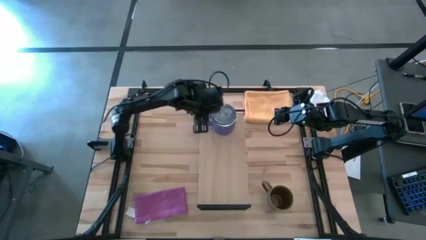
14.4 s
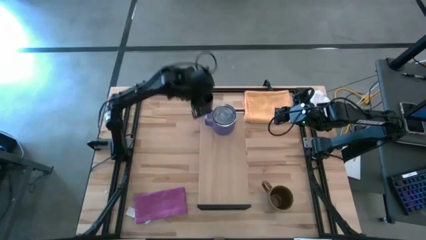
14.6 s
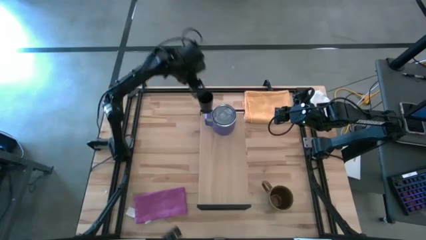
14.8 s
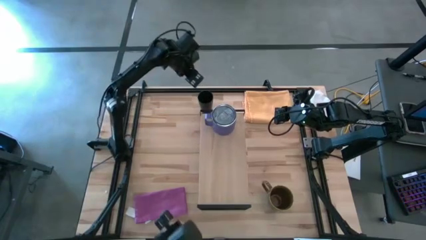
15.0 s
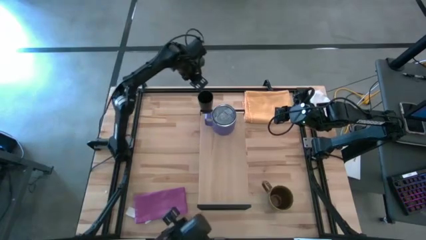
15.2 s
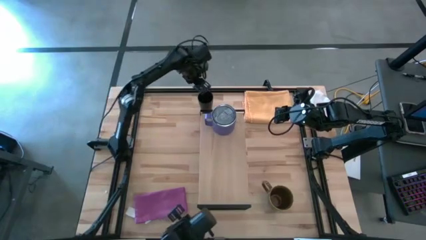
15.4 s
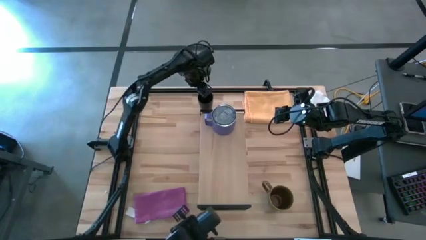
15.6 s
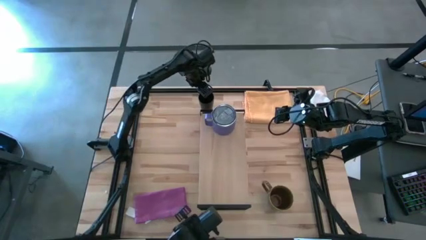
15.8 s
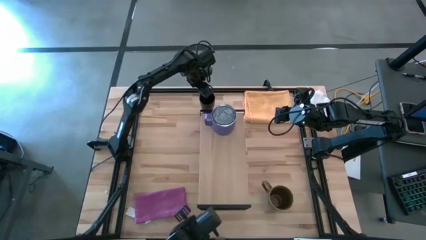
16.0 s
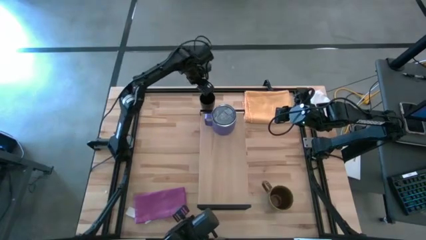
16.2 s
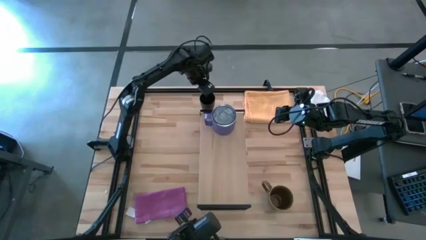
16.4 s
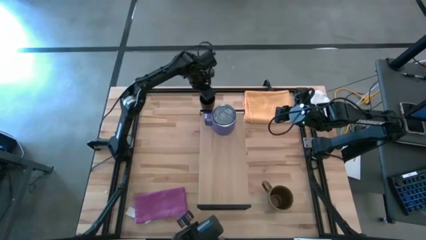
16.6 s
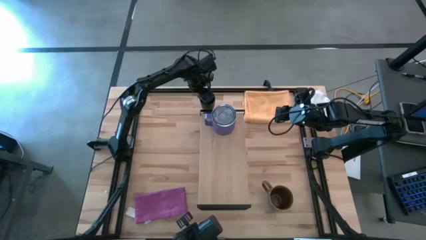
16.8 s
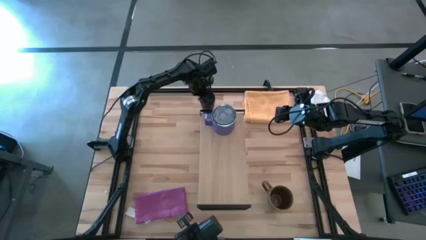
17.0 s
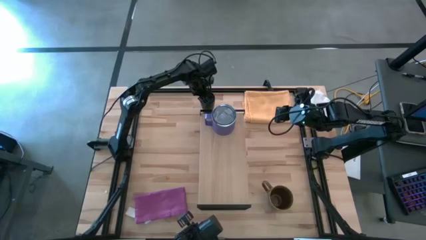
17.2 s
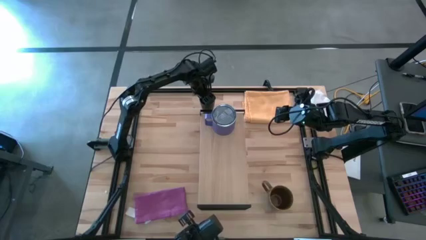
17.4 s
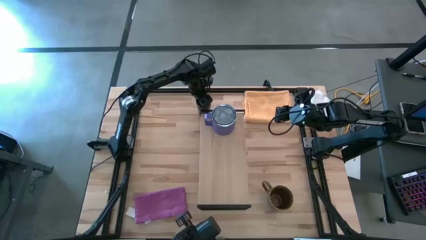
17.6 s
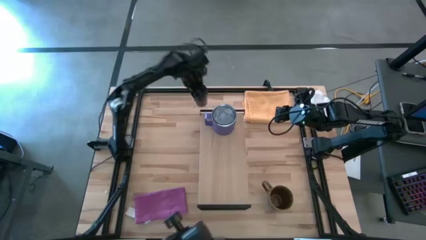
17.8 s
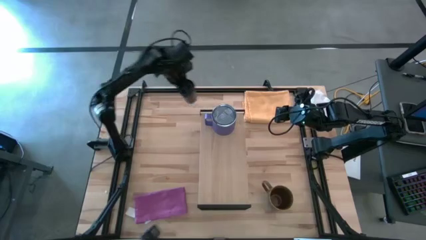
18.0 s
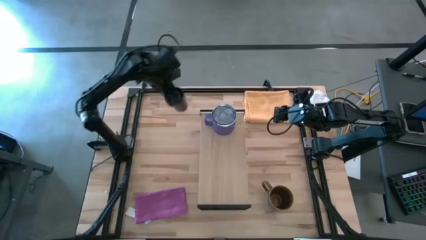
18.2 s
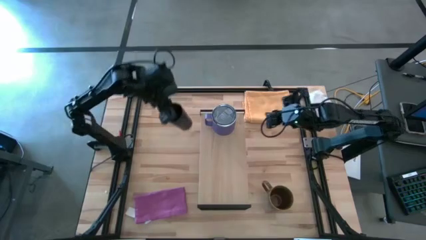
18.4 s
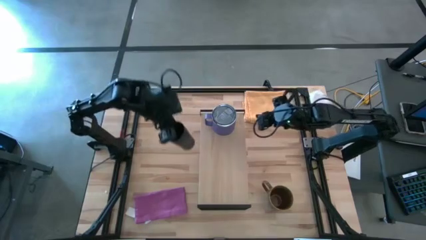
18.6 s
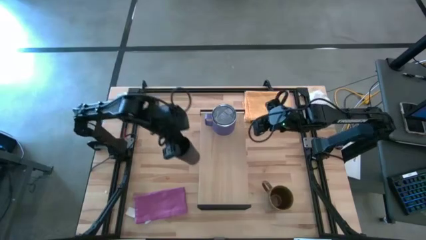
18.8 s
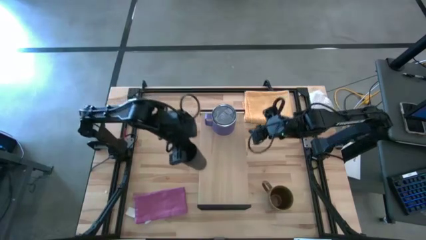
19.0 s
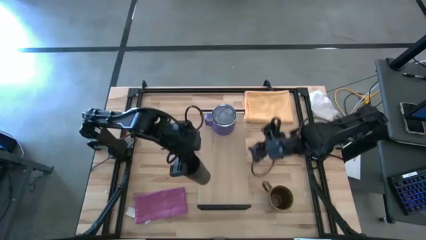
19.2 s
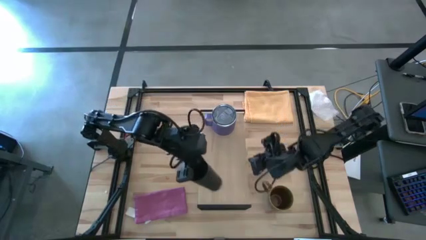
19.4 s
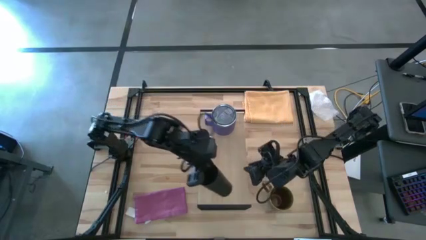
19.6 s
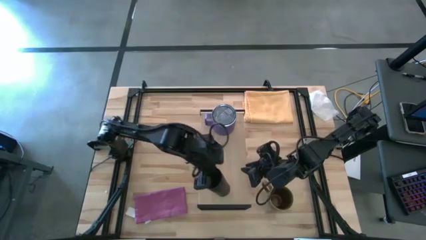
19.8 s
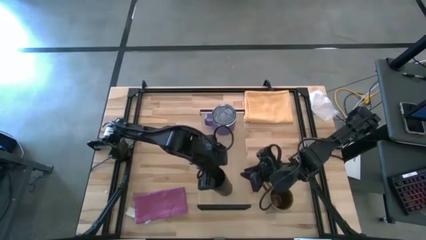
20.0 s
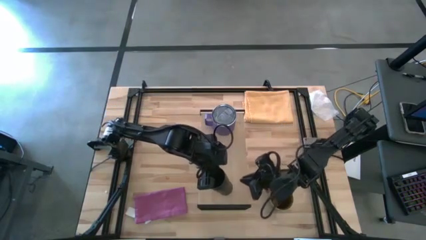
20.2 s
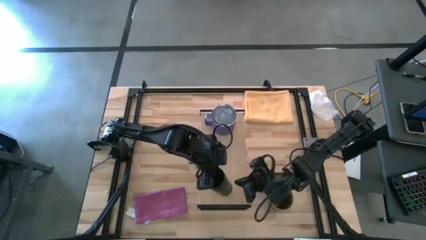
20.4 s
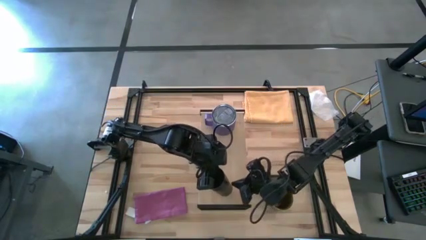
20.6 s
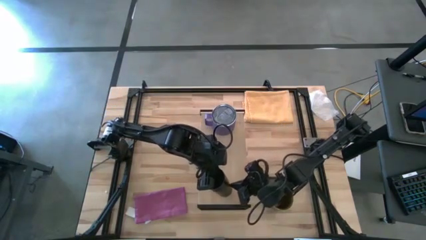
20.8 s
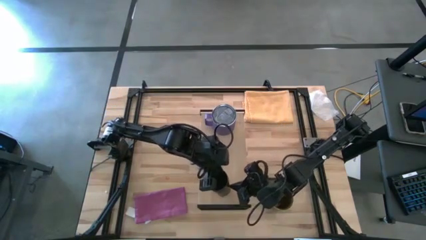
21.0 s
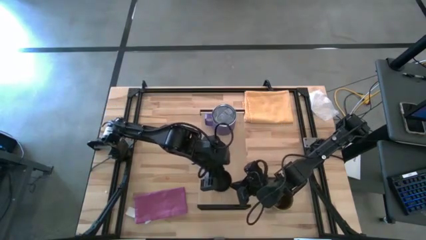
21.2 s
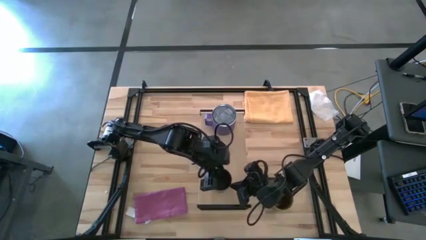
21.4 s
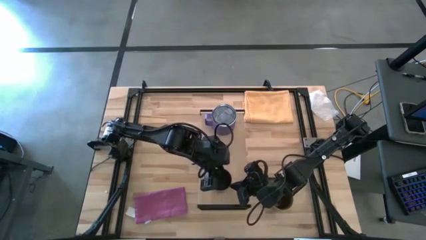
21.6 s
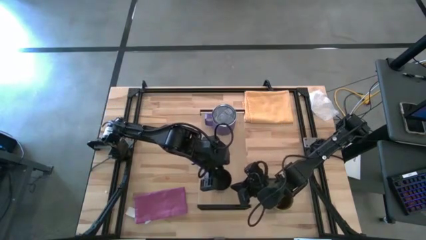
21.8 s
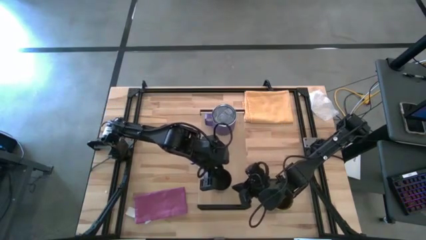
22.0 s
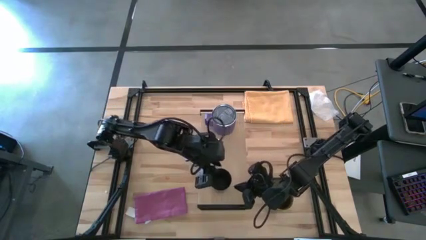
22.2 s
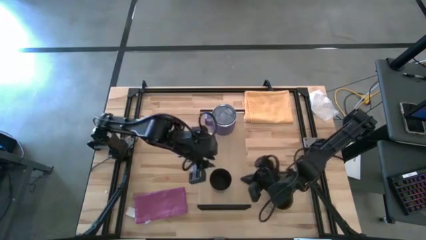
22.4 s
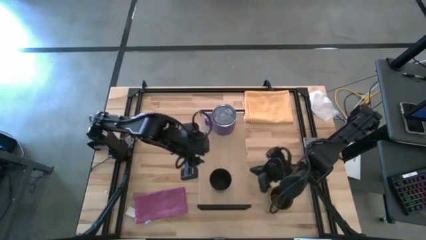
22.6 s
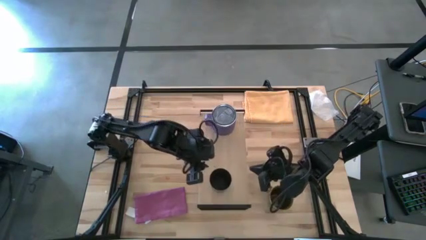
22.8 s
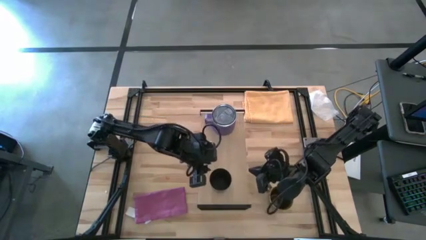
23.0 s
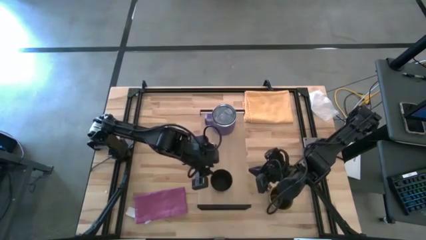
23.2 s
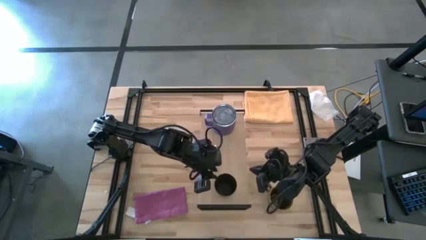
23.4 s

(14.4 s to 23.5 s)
Task: Stack small to large cups/mugs on shelf
Put the black cup on the shelf

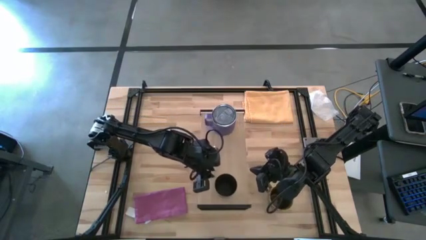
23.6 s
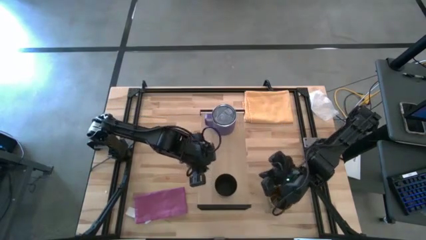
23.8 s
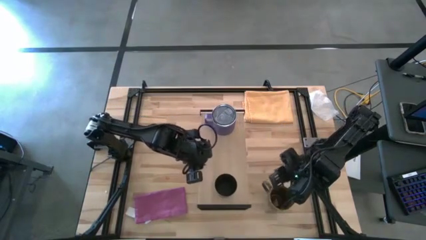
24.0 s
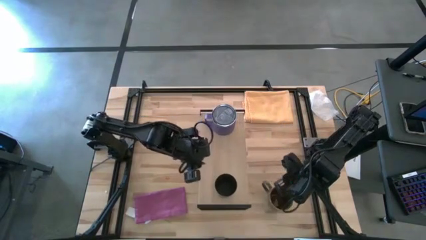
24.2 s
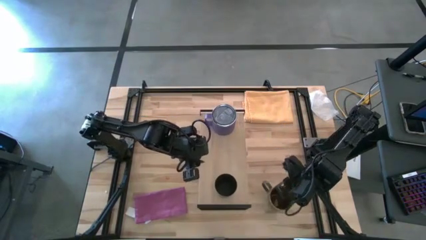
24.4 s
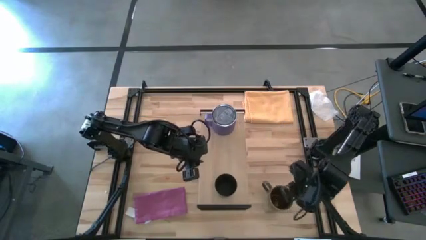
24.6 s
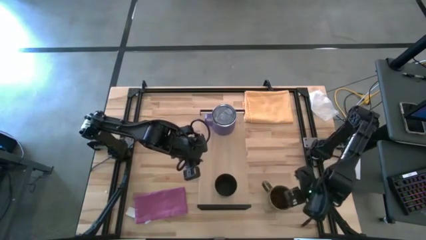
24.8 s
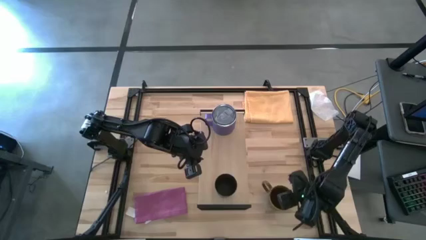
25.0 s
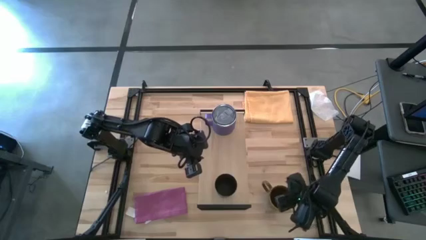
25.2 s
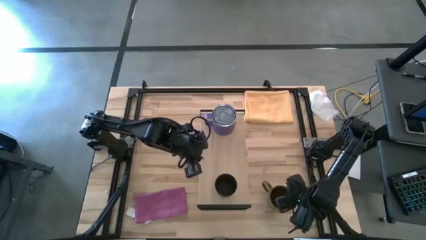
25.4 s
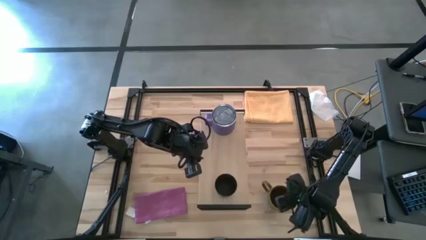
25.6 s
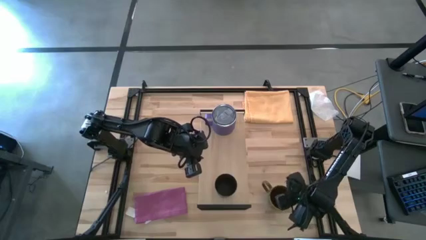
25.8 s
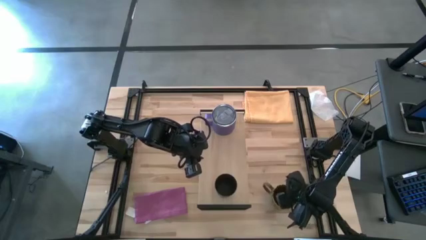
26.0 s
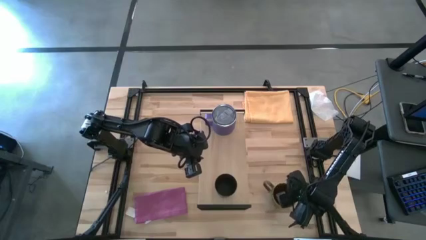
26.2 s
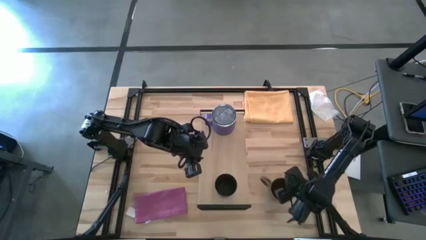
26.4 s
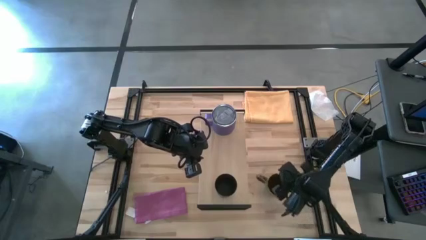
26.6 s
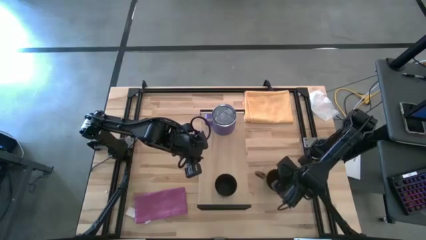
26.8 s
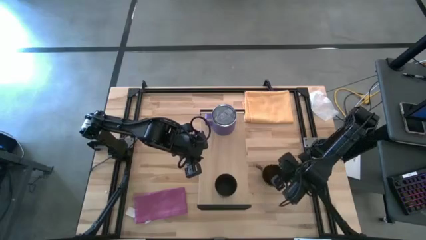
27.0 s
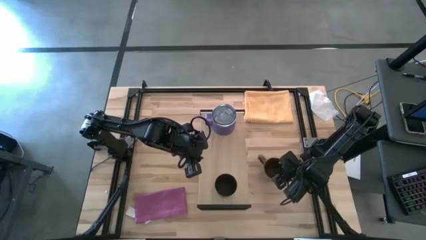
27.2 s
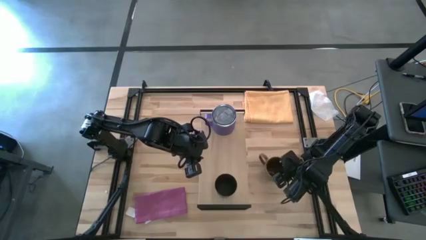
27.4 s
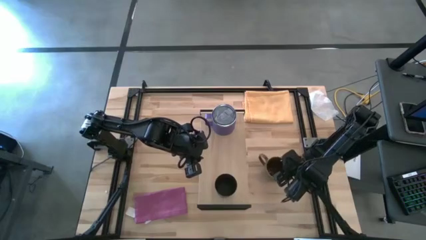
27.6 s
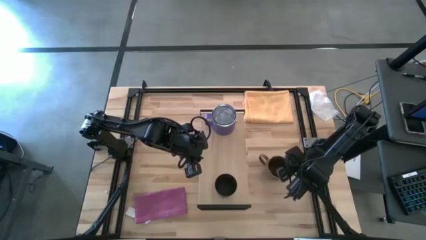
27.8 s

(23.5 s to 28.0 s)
Put the green mug on the shelf

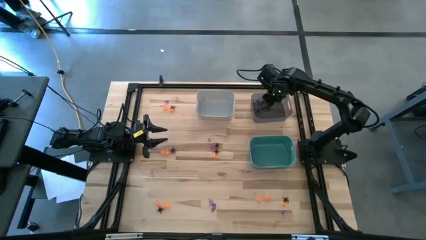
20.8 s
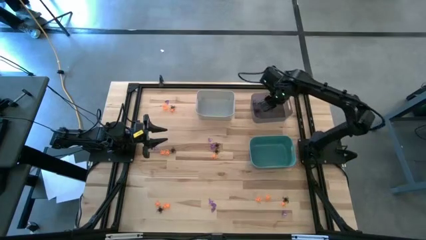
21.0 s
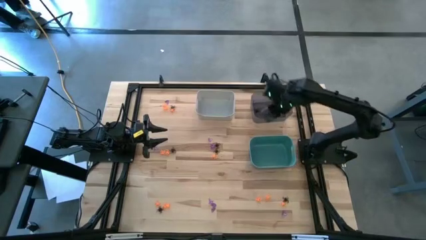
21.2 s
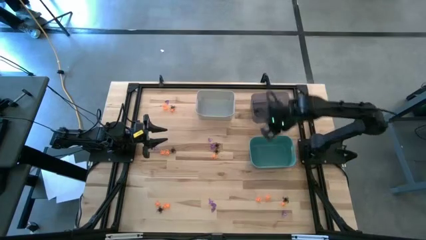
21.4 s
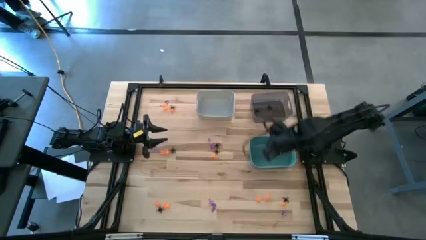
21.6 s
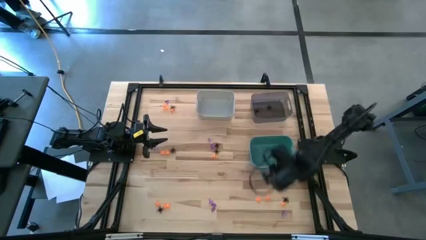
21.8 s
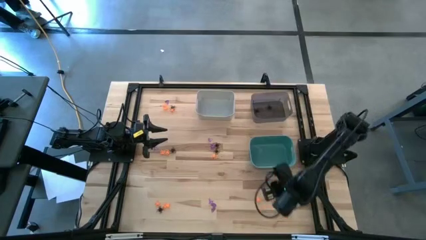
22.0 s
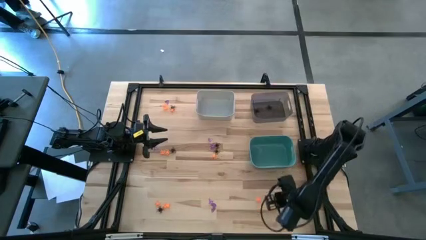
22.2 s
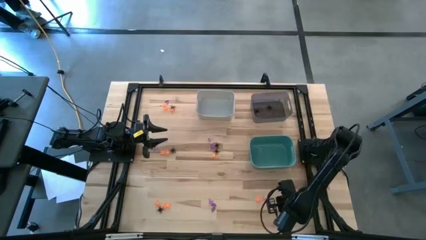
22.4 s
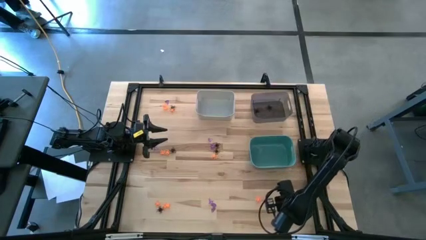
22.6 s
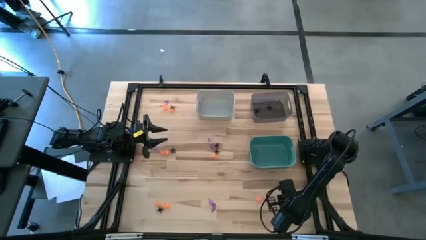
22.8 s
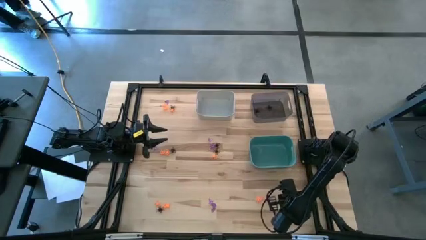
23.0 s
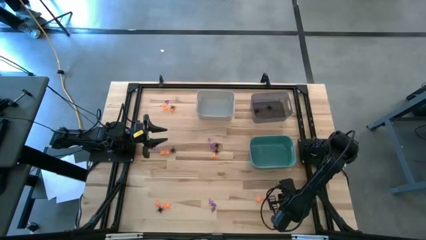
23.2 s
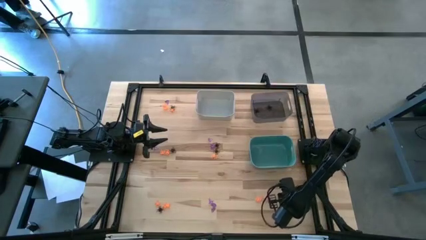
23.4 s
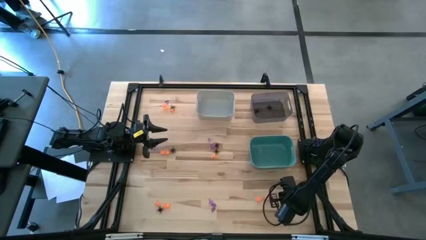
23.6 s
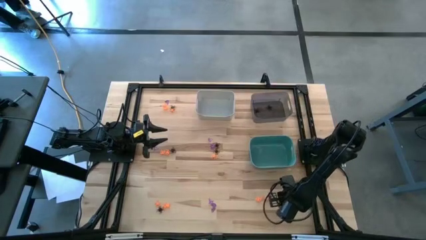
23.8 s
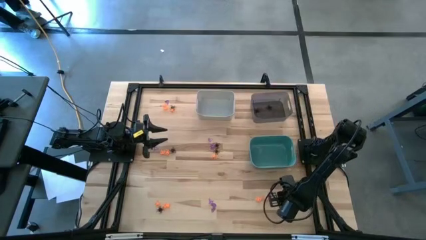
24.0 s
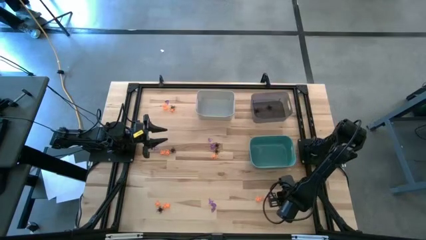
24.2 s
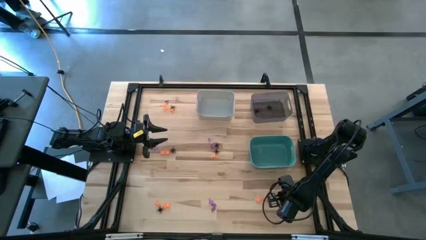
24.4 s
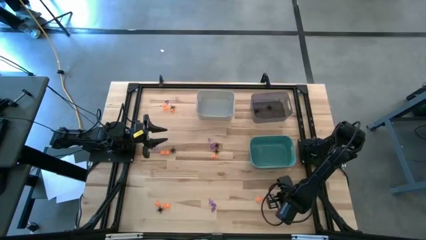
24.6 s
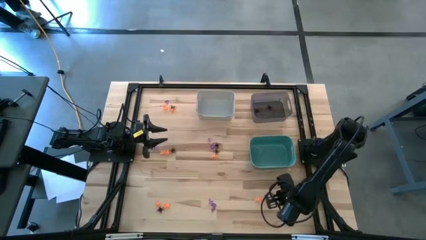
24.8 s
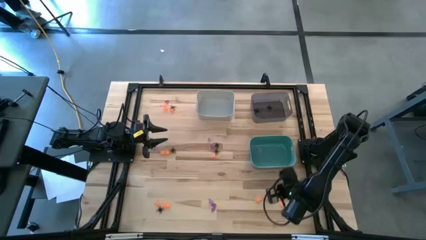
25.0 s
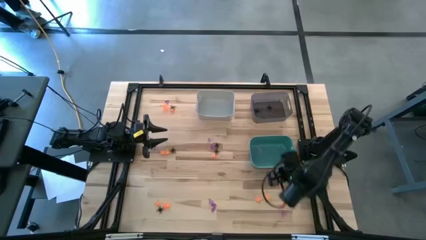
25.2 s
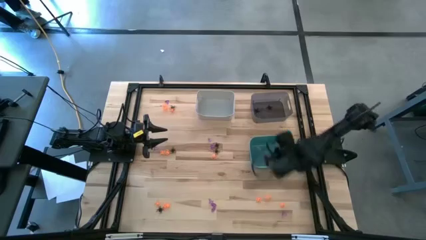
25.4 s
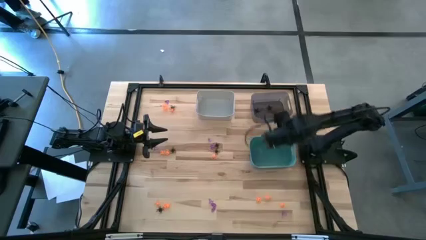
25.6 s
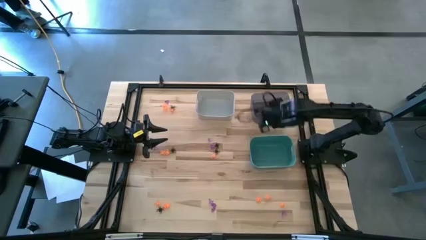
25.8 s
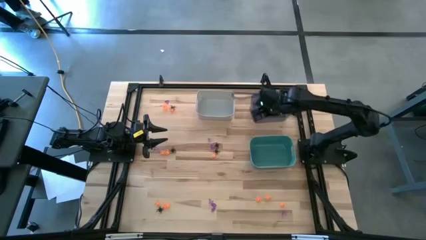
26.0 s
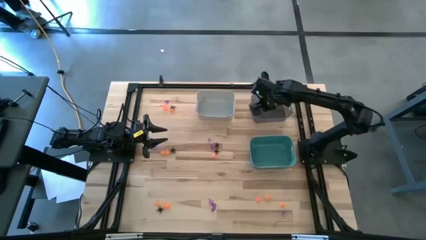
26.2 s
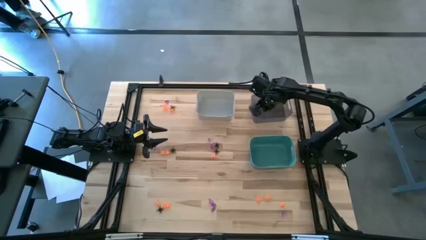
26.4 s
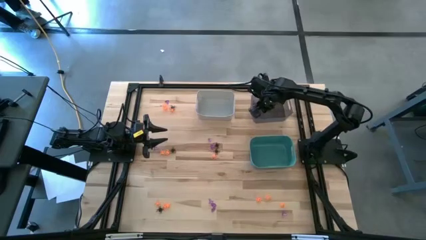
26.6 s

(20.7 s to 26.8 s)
Task: Sort Halloween decoration
Put the black spider toy into the black bin
